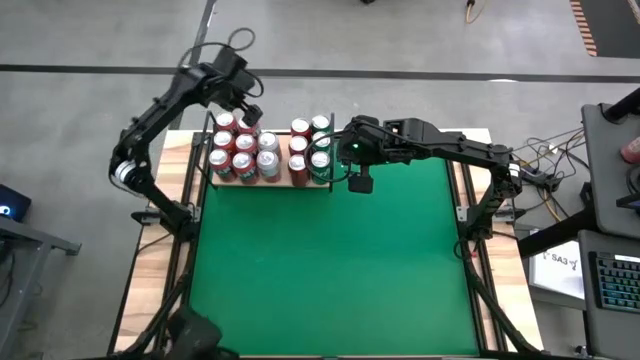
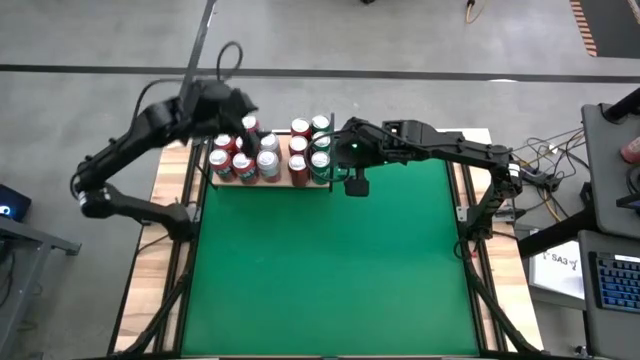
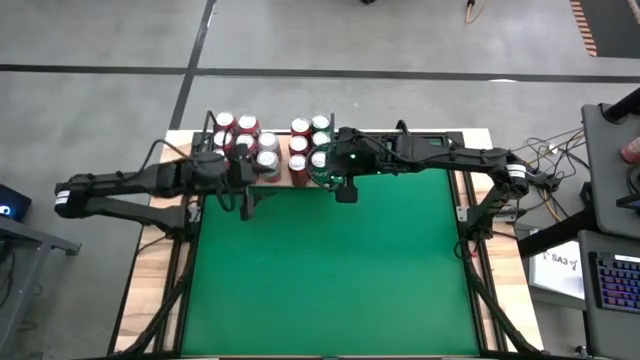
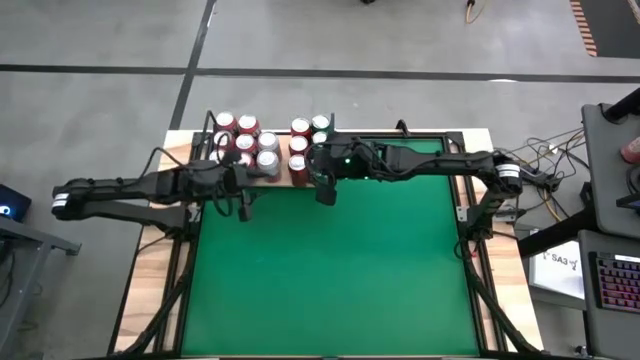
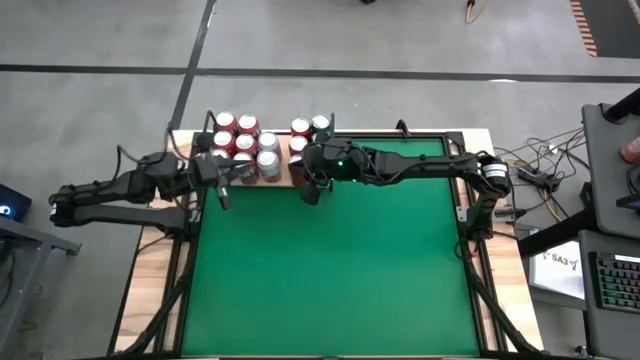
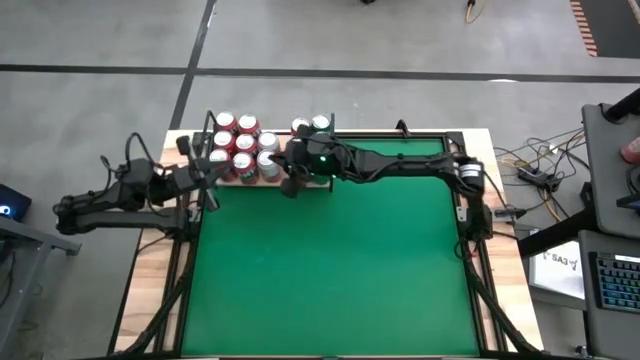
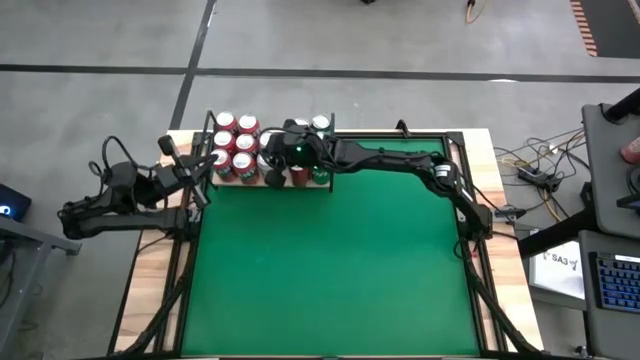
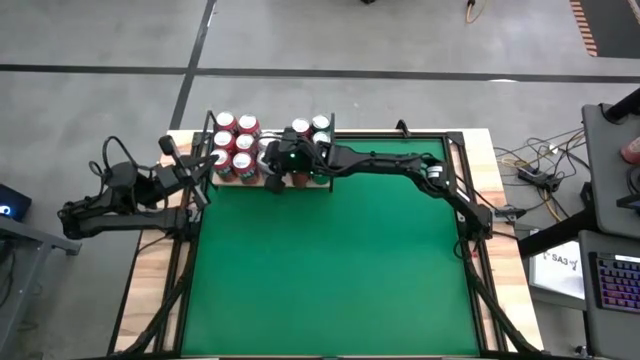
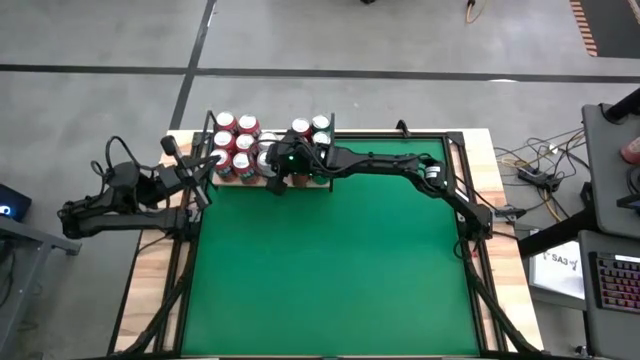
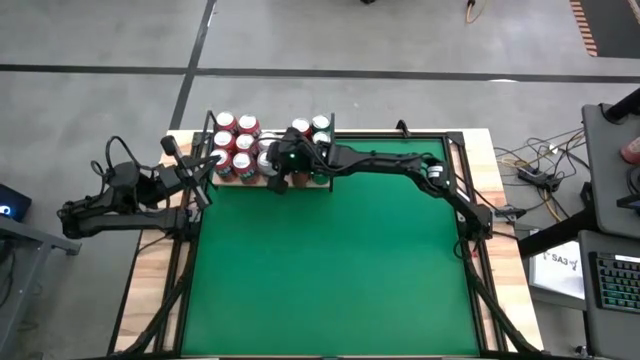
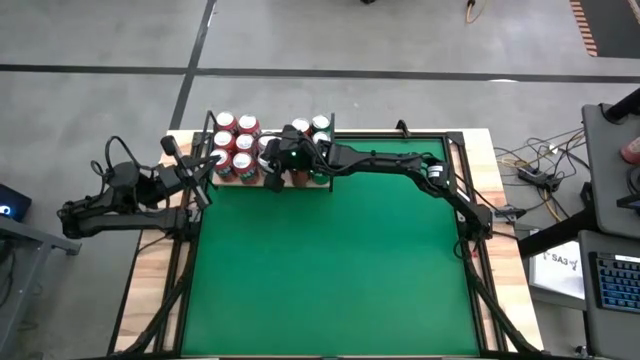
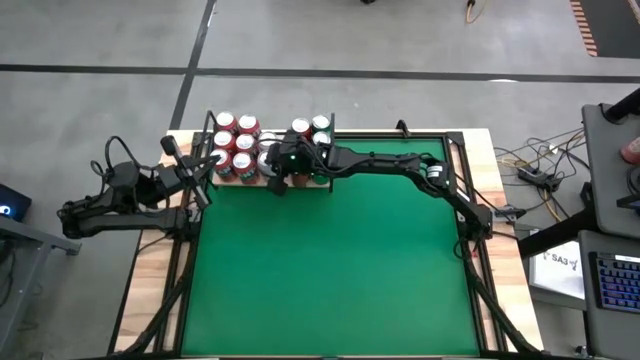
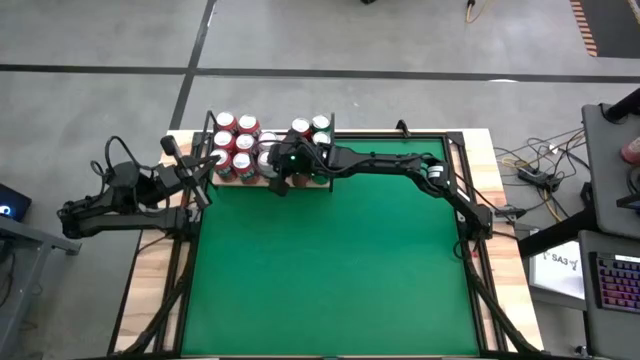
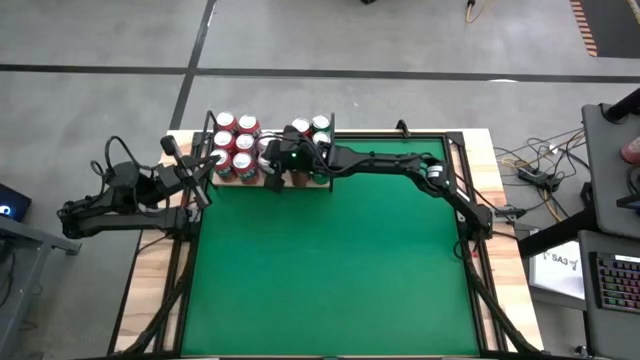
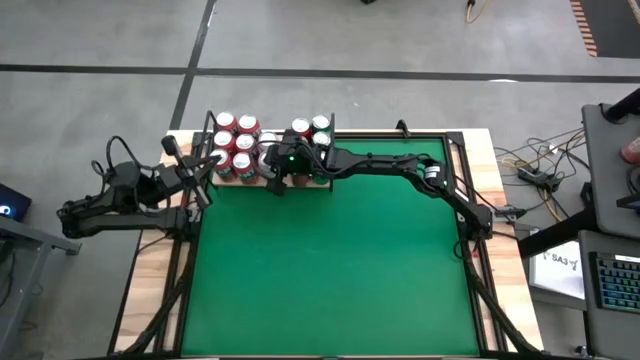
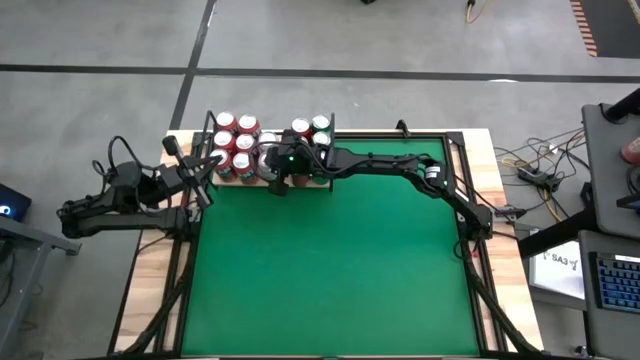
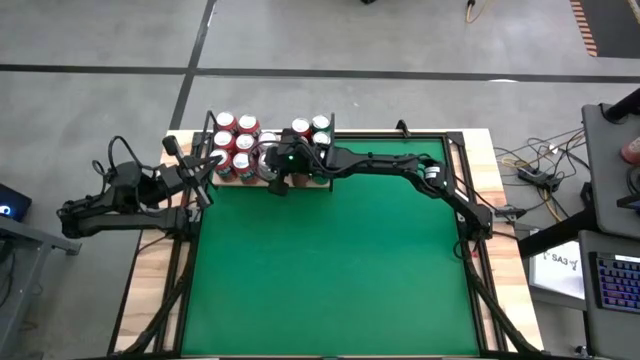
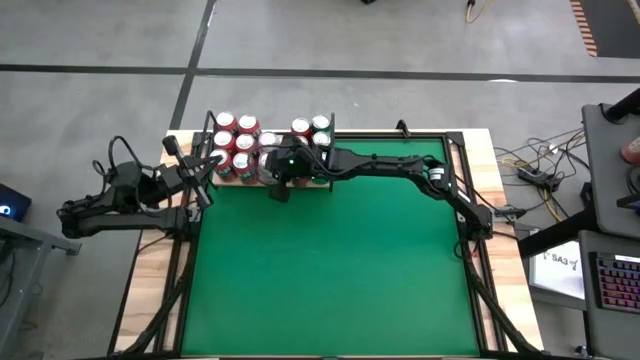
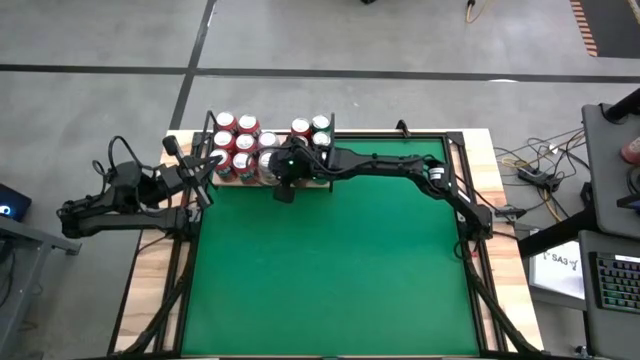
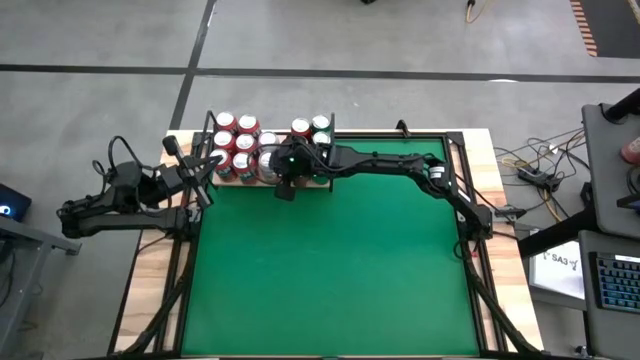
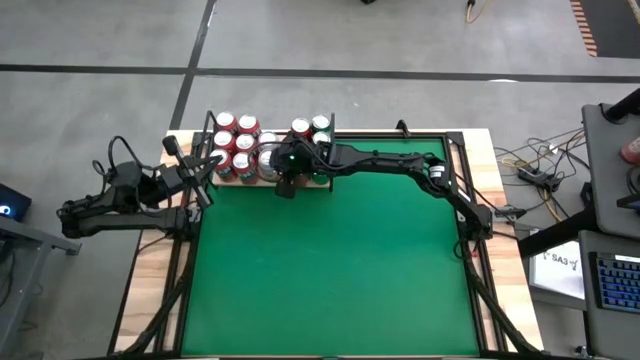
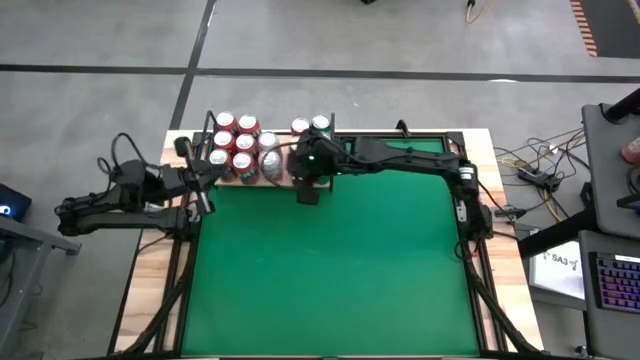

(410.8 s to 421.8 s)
Task: Place canned beverage on shelf
Adjust the soda cans on the shelf

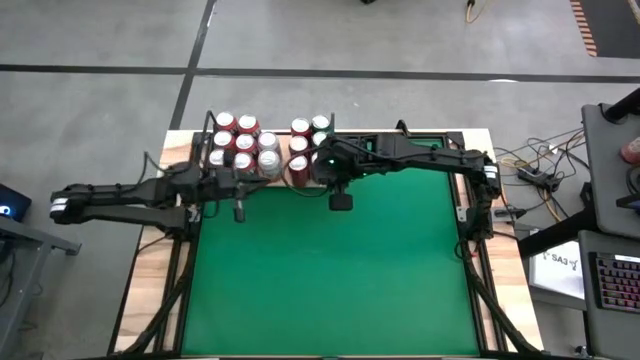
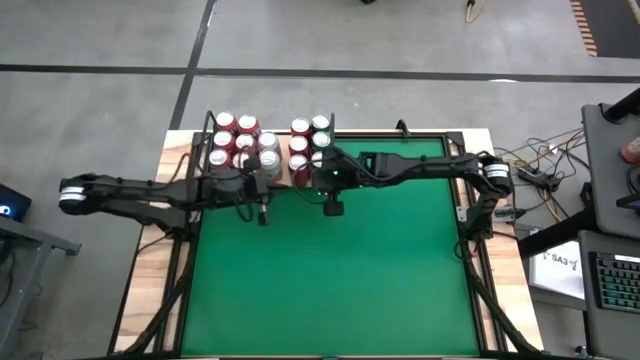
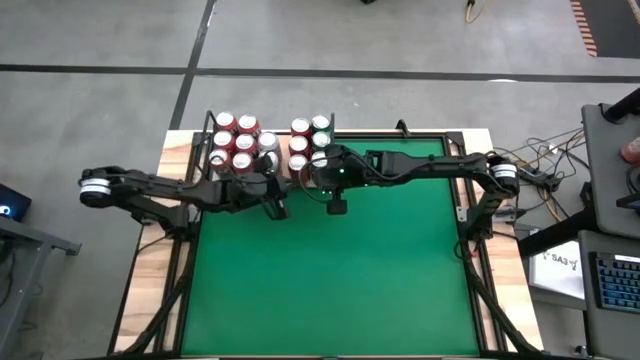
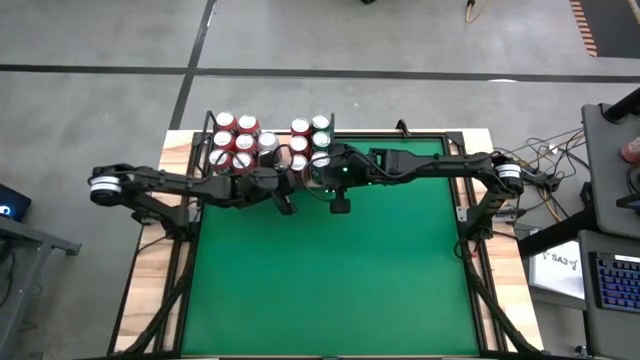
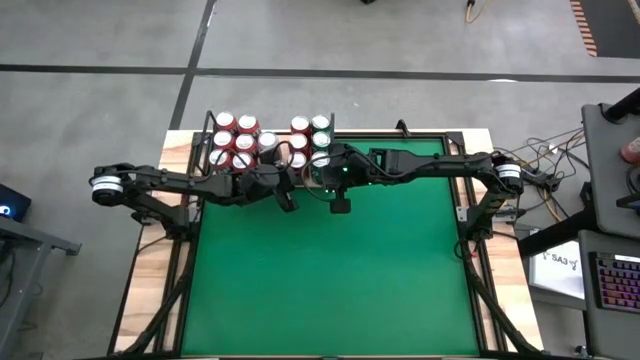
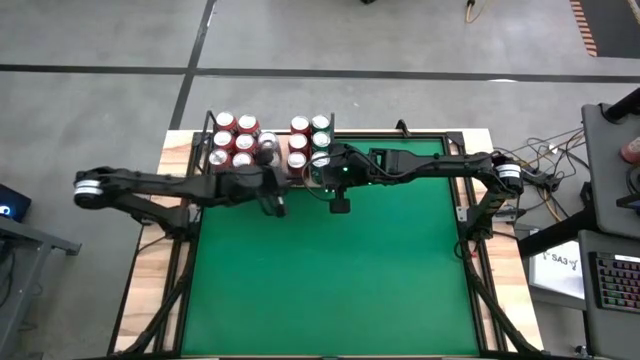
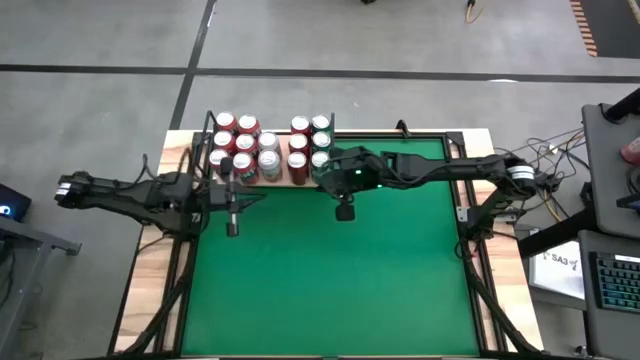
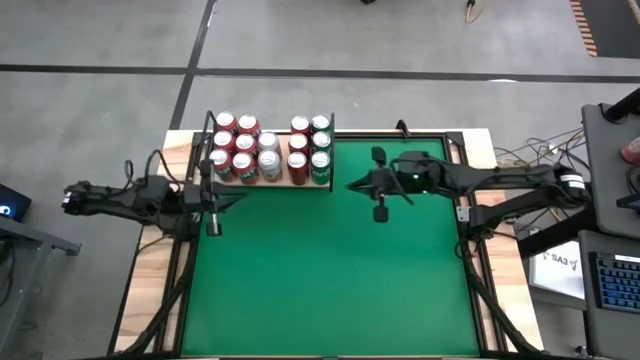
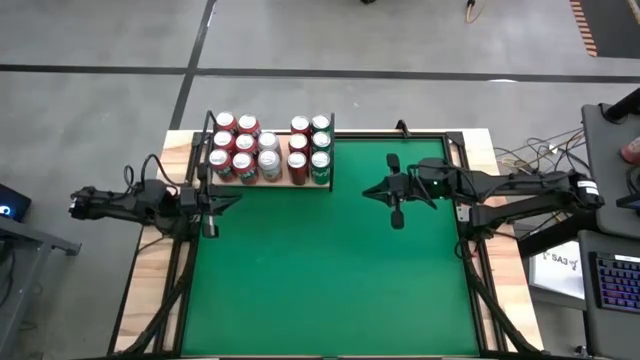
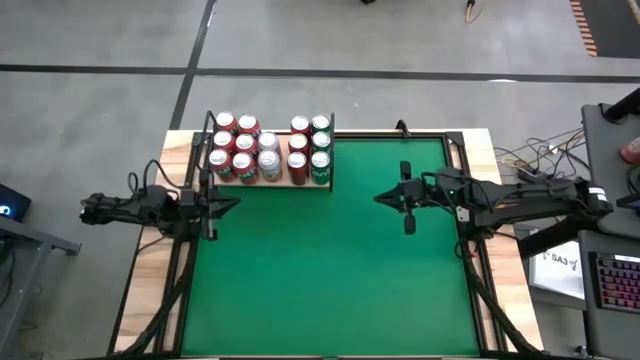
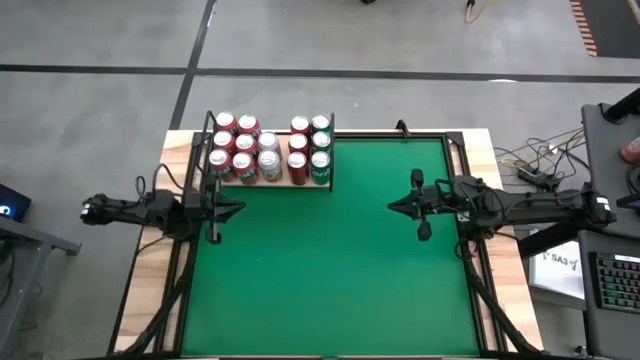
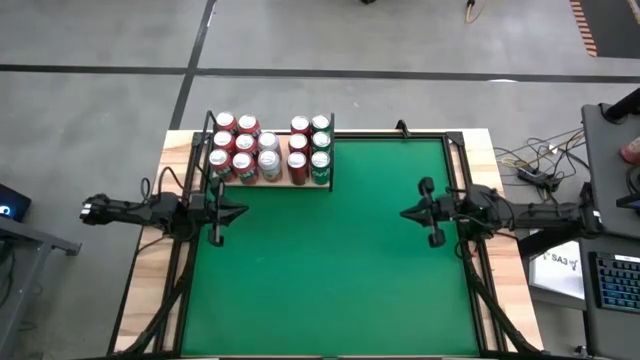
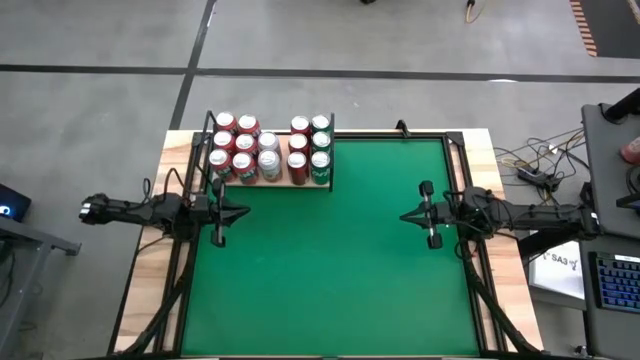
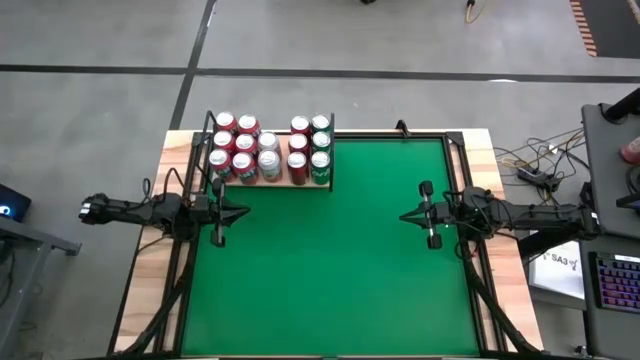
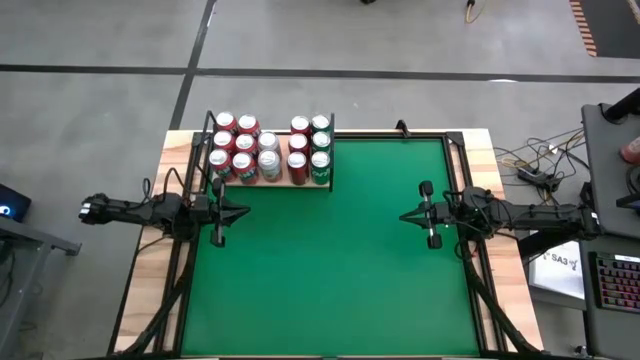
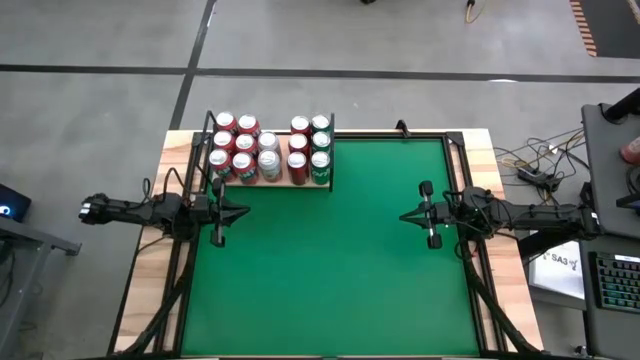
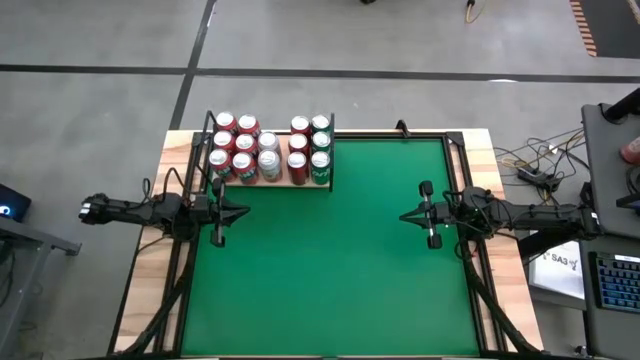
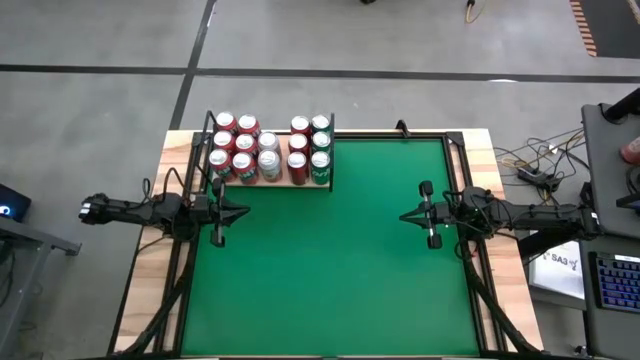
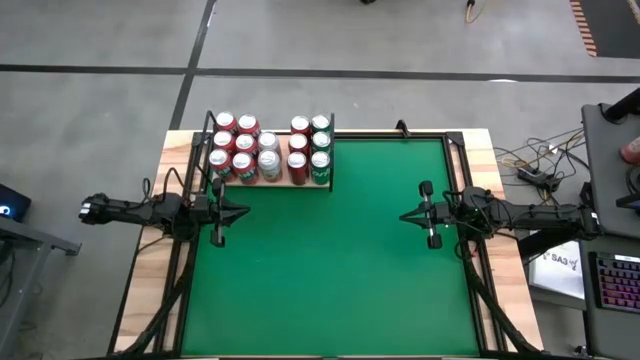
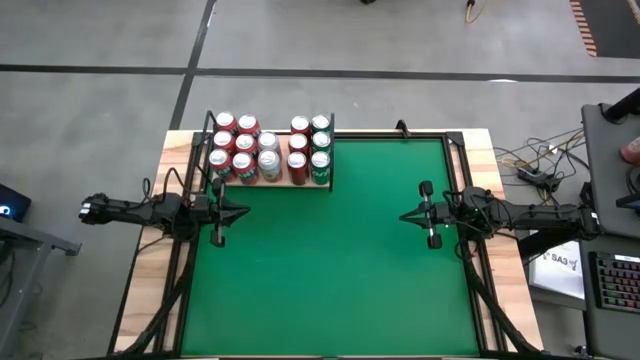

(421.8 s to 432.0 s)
Return to Home Position
